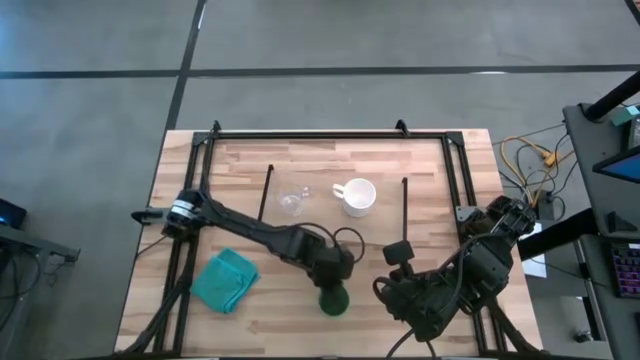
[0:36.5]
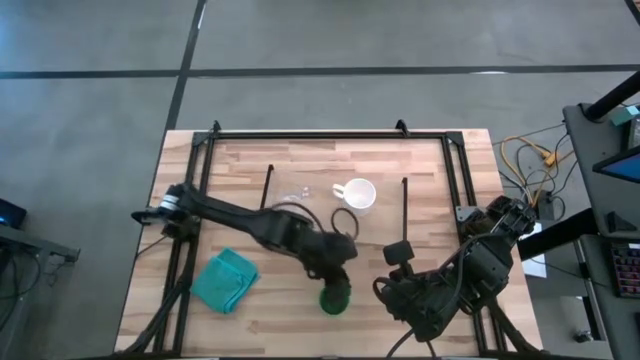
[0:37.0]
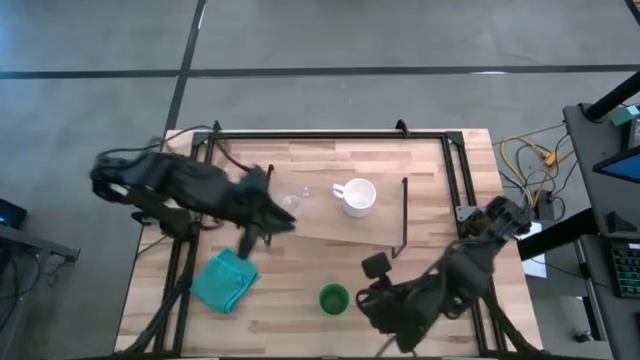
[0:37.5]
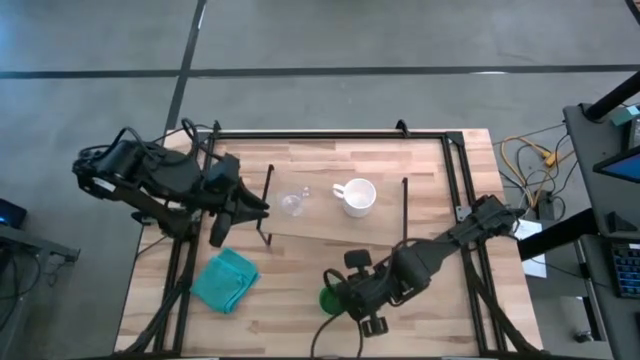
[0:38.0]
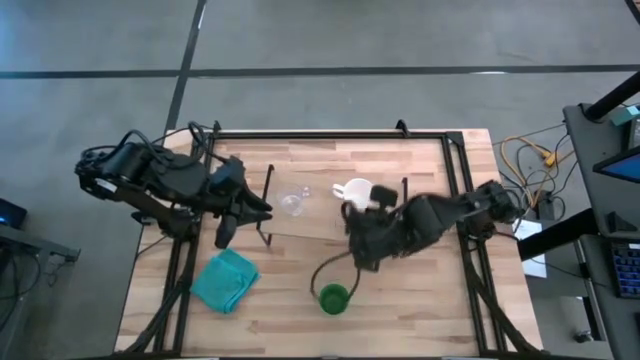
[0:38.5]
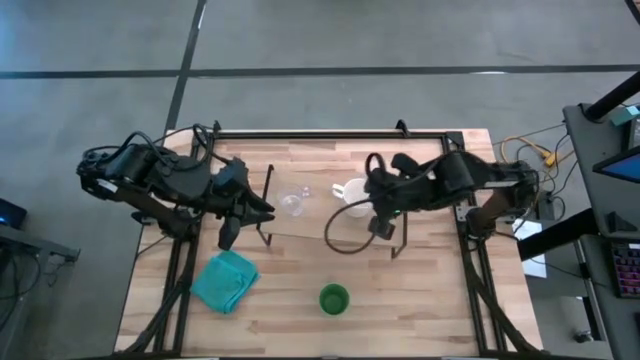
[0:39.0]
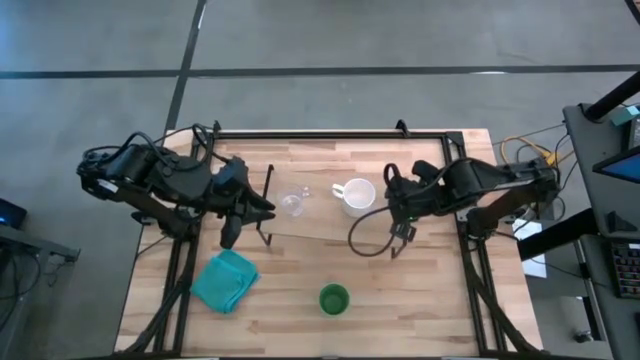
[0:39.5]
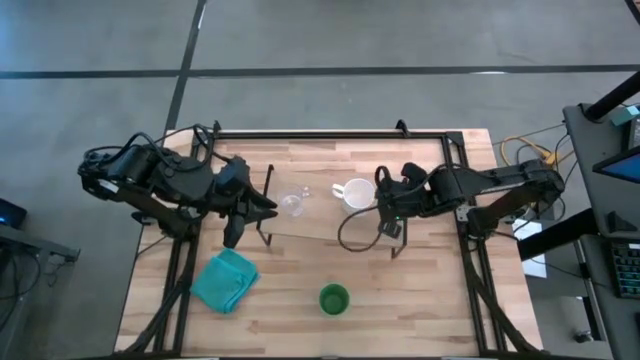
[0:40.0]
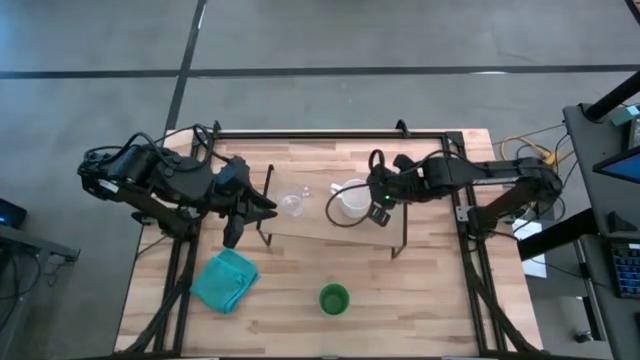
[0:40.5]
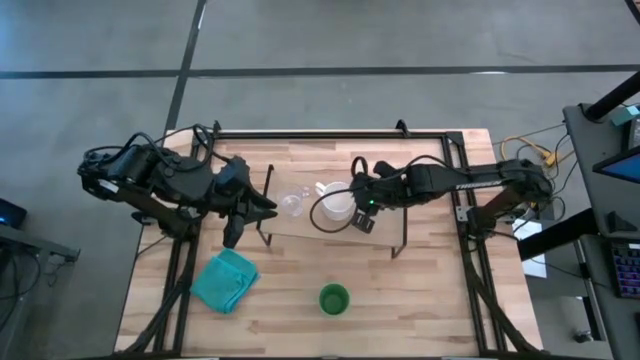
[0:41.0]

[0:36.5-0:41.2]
Task: Stack small to large cups/mugs on shelf
Adjust the white cup on the shelf

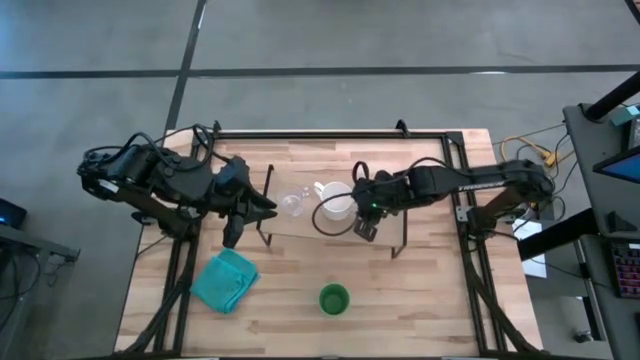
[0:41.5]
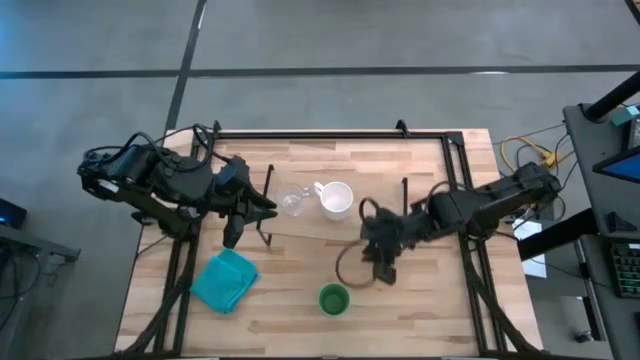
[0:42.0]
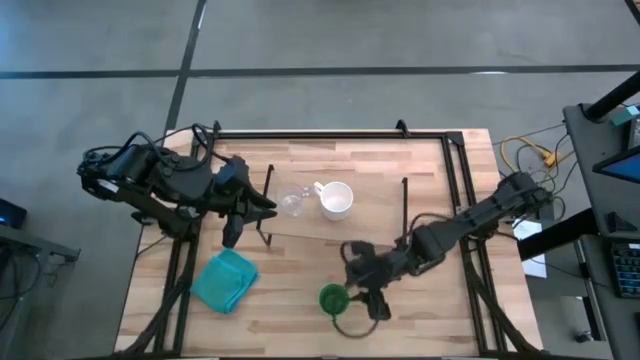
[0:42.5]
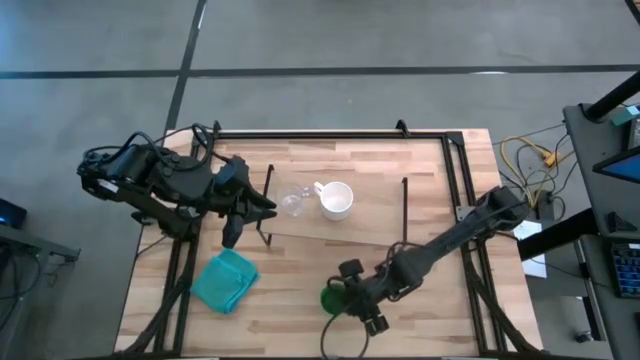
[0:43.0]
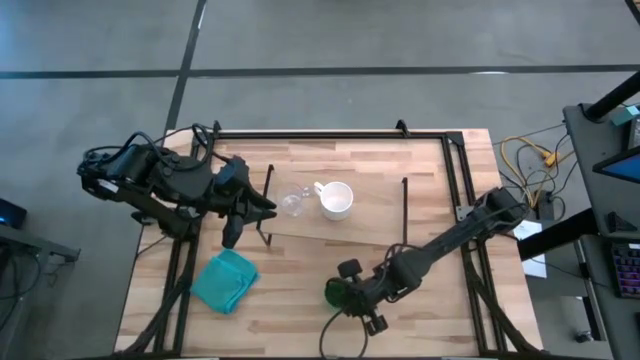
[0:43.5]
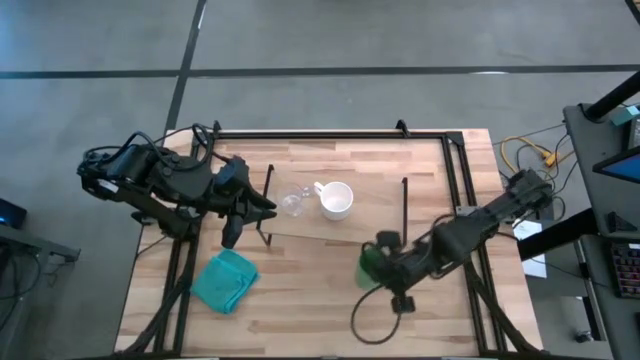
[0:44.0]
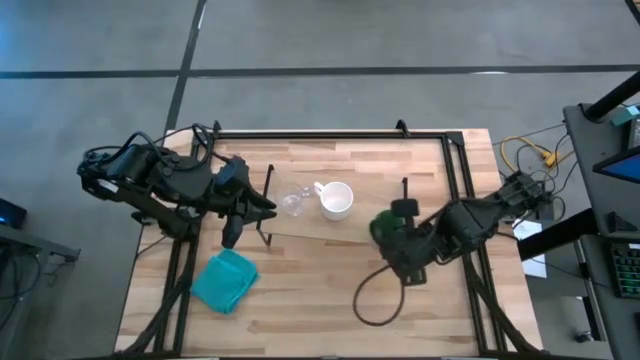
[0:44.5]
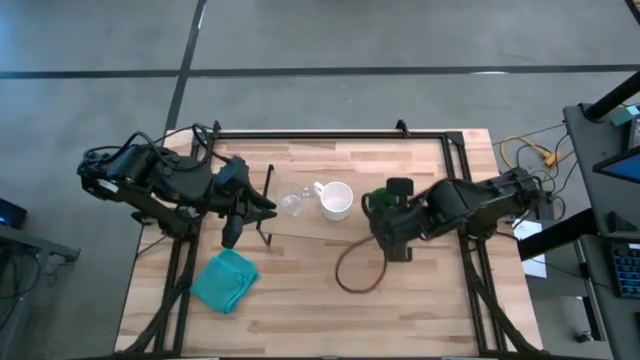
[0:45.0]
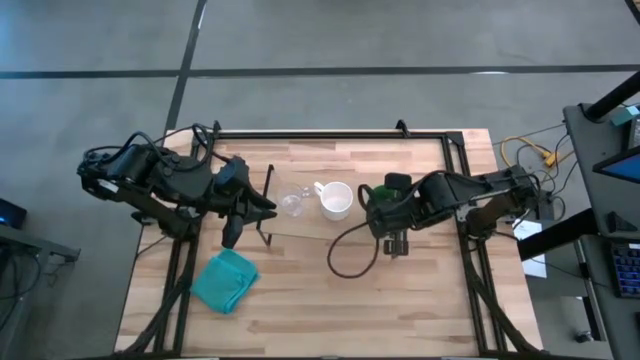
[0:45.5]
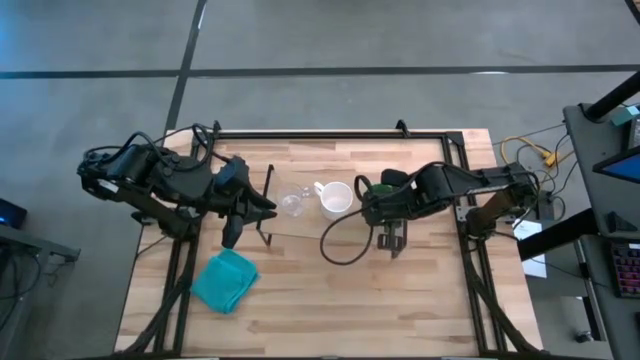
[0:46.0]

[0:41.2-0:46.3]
Put the green cup on the shelf

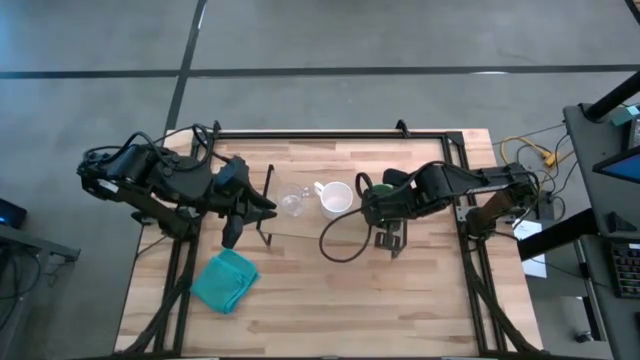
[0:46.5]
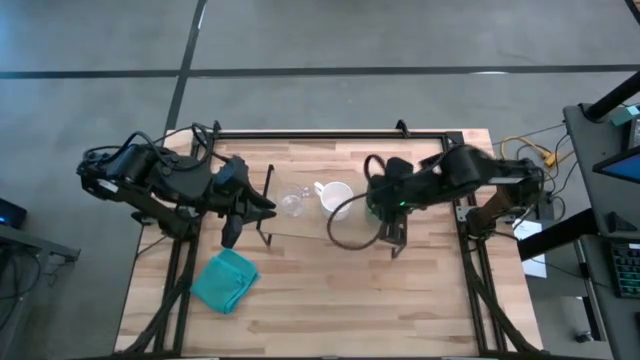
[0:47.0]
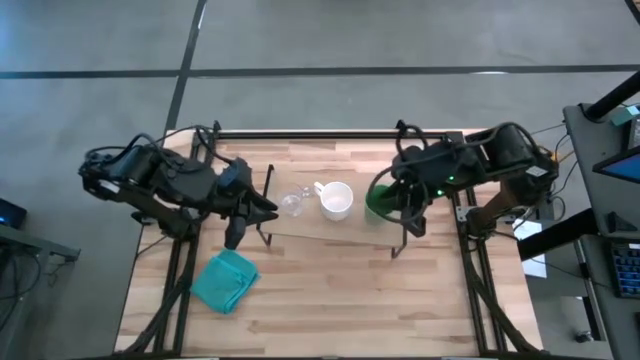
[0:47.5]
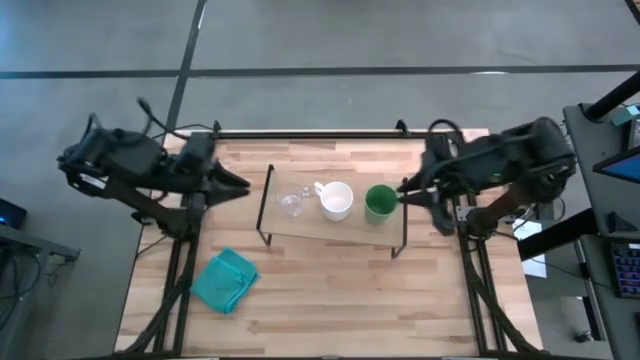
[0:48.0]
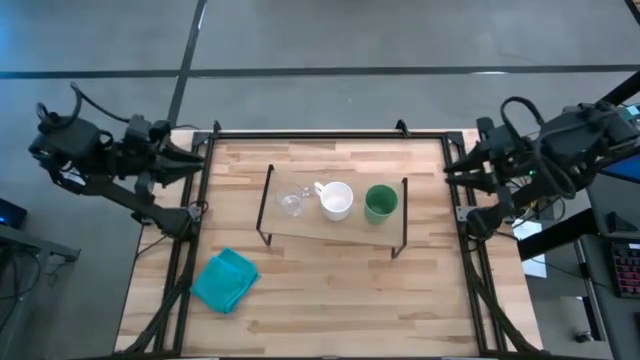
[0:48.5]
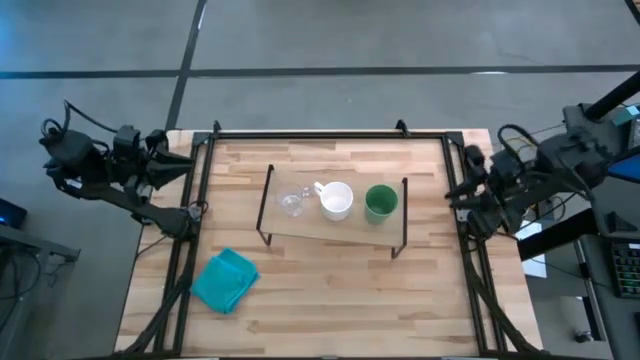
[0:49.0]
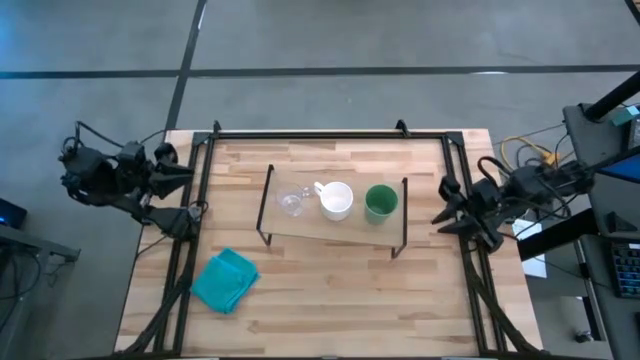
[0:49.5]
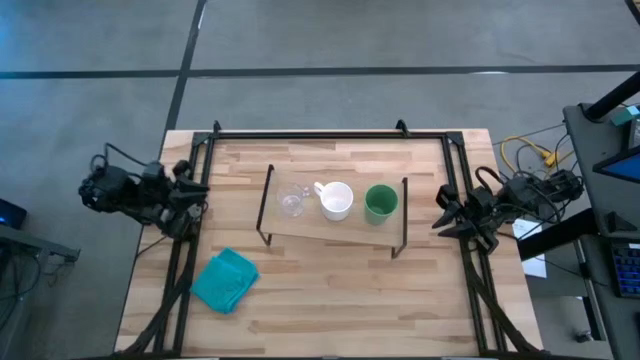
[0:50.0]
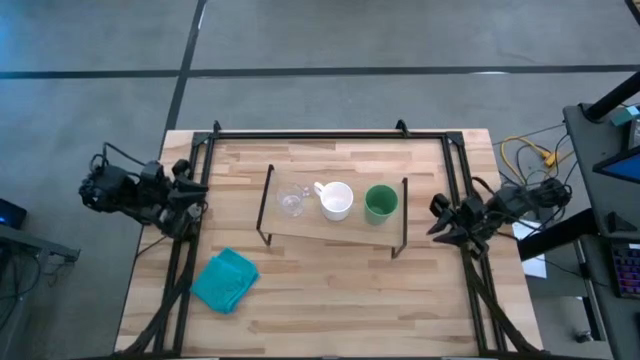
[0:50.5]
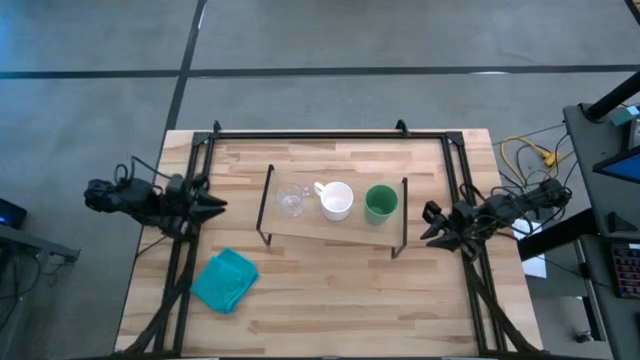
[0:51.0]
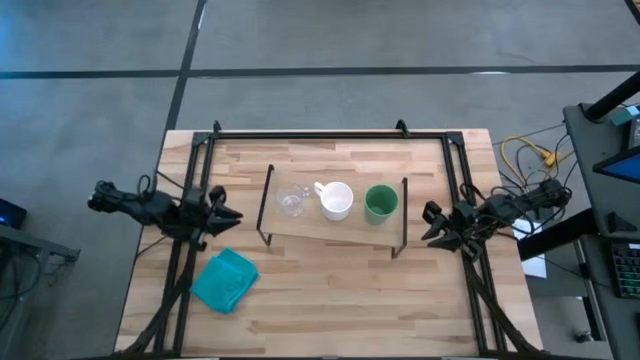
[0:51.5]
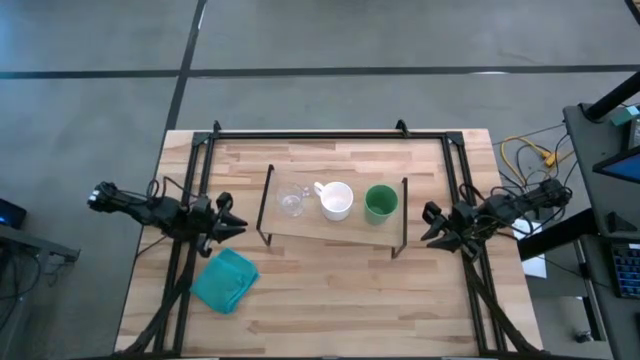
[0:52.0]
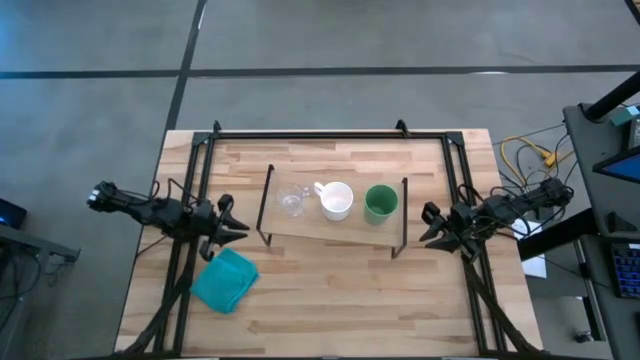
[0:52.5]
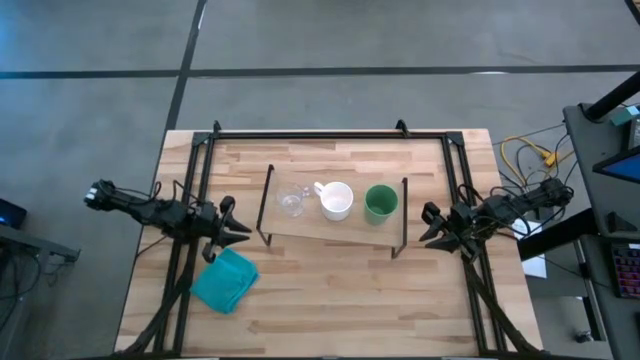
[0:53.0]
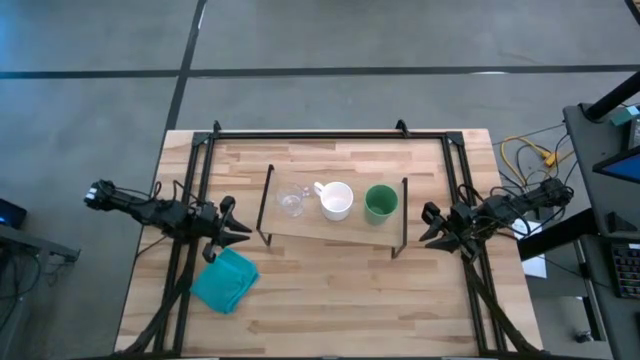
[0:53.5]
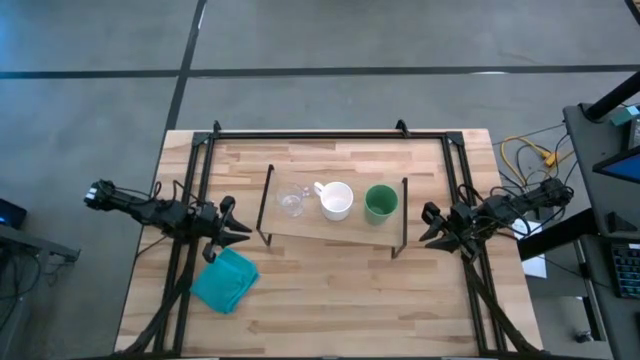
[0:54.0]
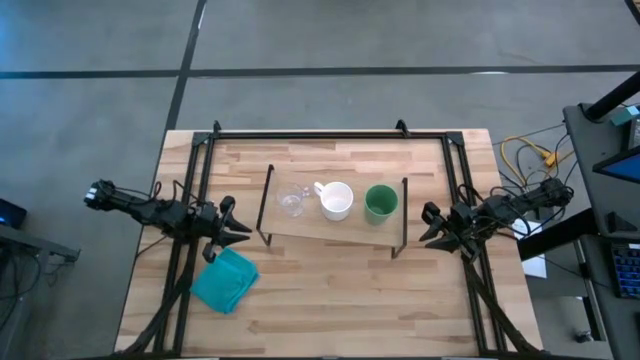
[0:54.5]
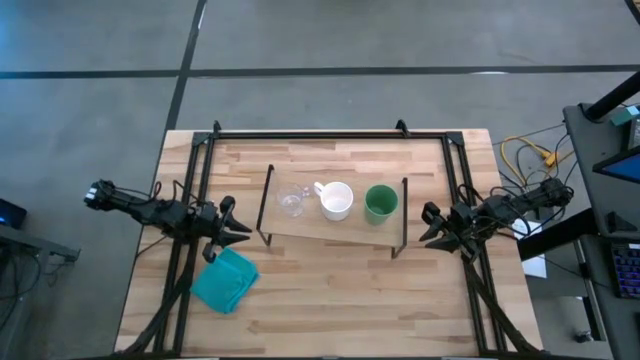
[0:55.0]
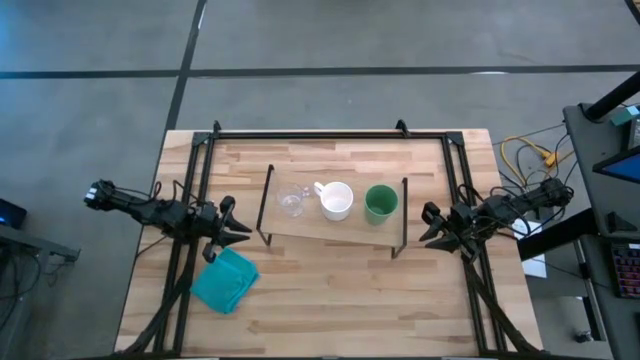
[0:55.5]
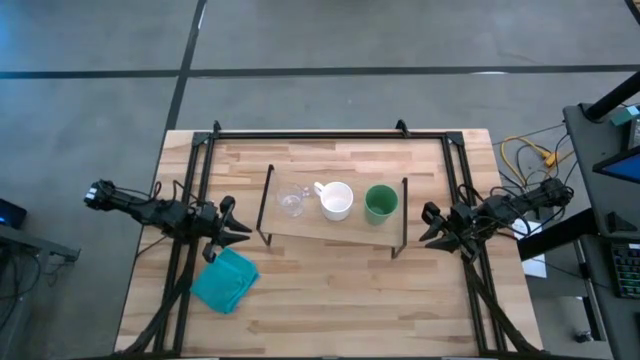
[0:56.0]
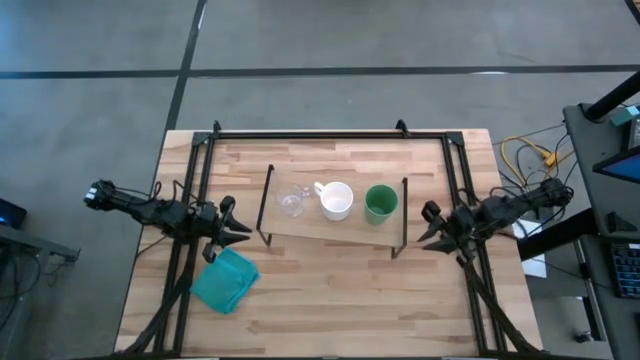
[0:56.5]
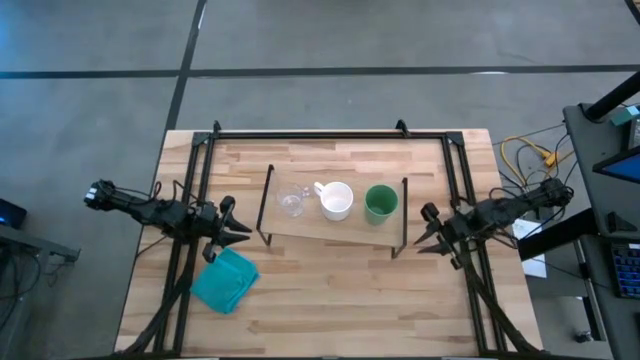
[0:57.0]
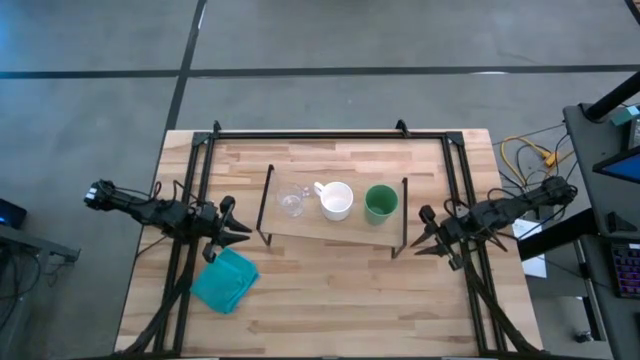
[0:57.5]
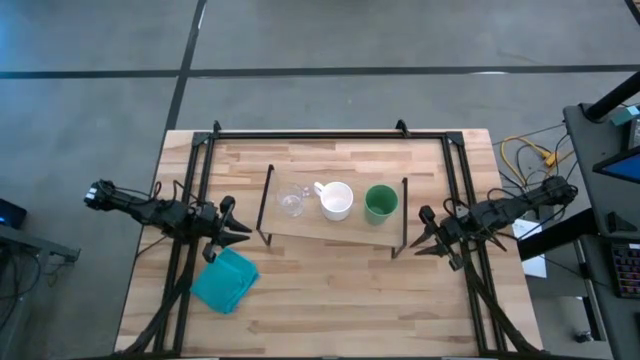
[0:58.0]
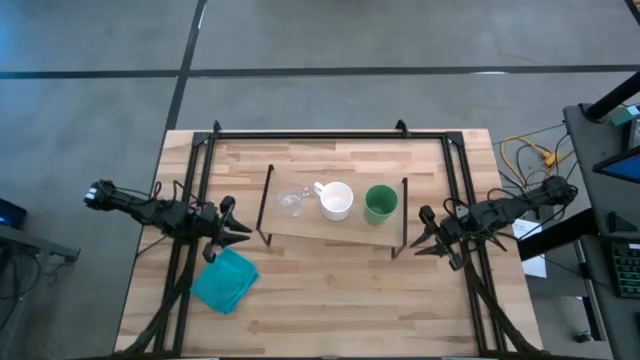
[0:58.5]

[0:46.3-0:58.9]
Return to Home Position
